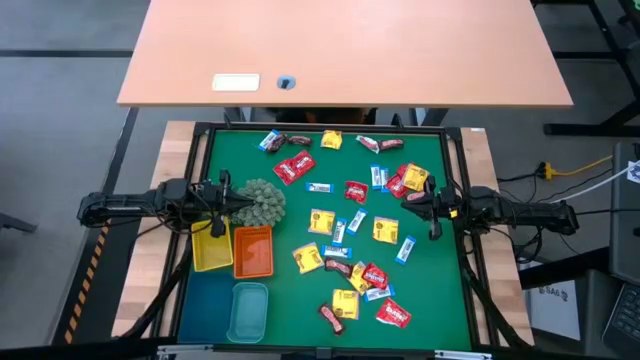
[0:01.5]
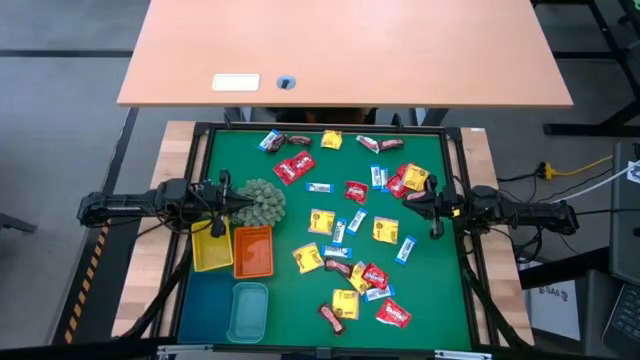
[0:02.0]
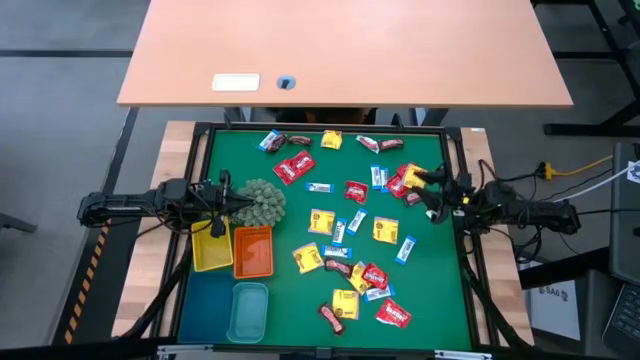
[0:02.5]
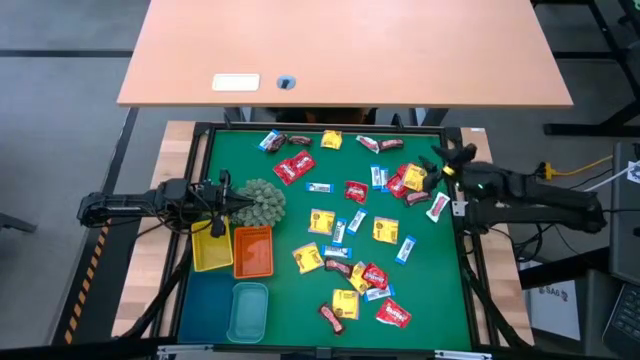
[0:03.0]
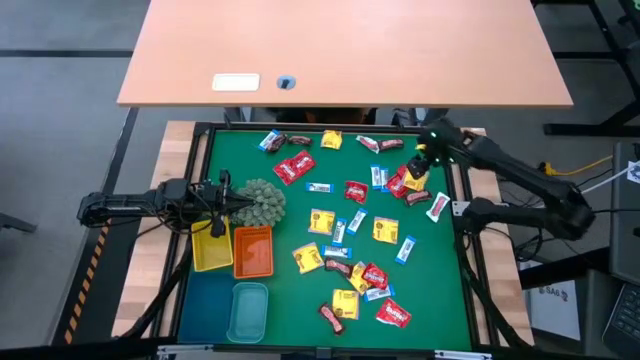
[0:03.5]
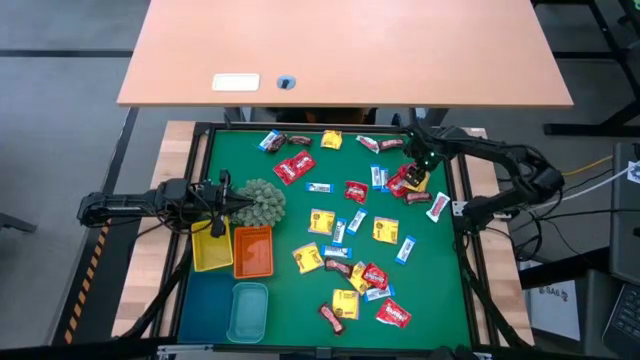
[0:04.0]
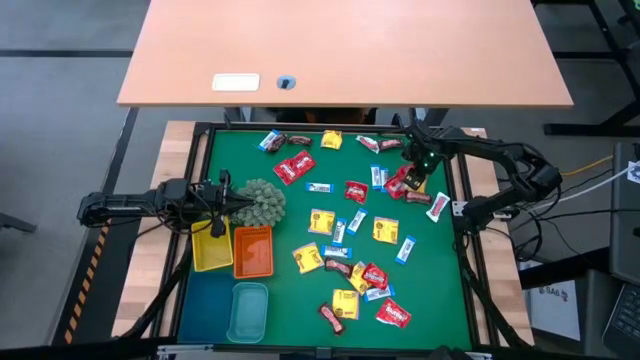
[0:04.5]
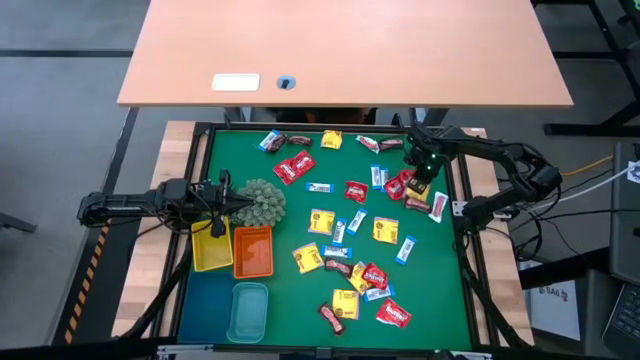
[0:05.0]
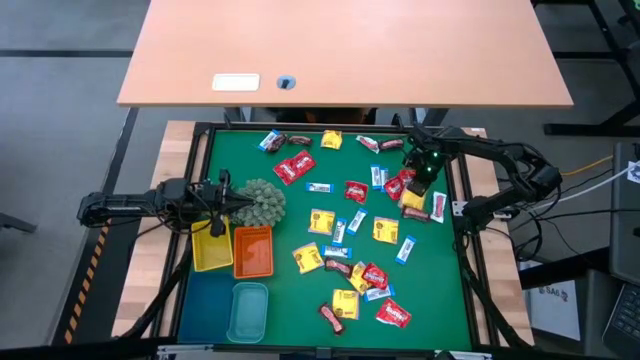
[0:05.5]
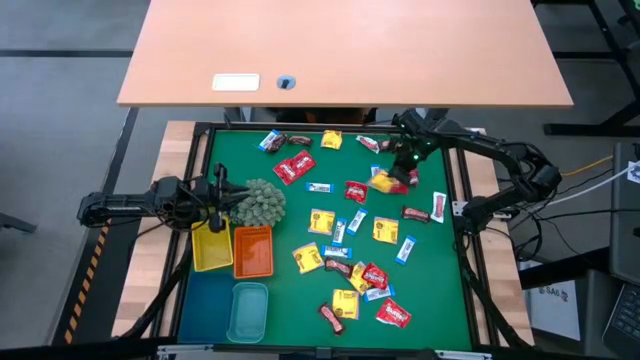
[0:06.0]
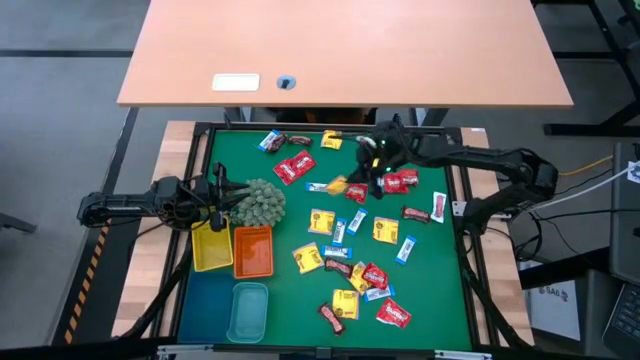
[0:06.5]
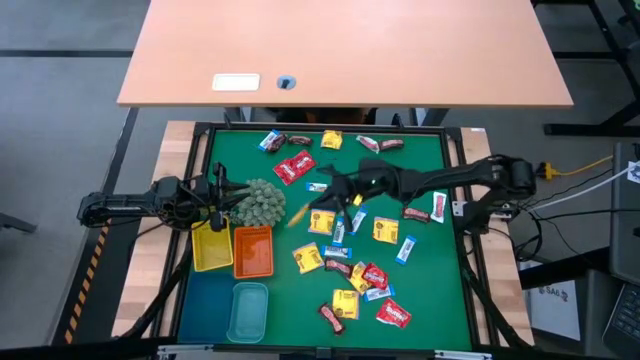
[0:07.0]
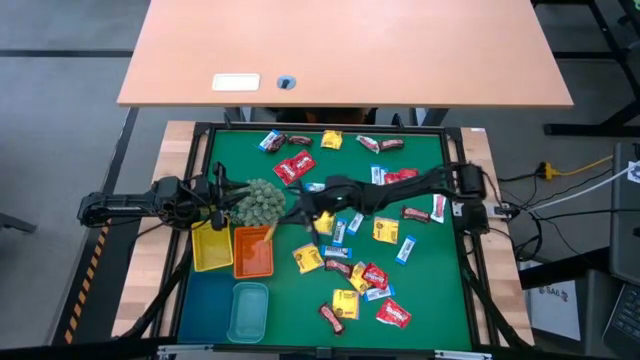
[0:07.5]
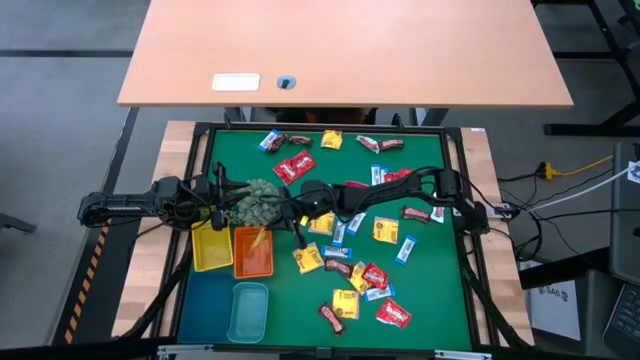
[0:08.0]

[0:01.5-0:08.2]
Task: Sort candy
Put the yellow candy into the orange basket

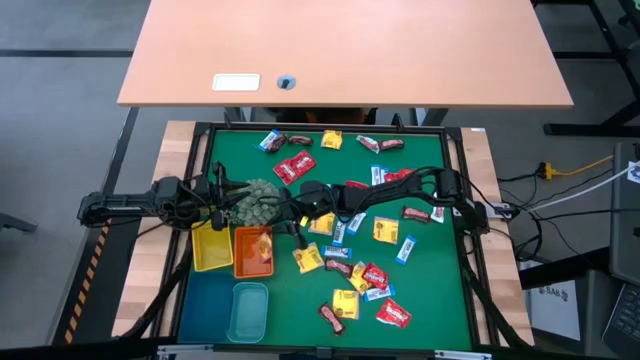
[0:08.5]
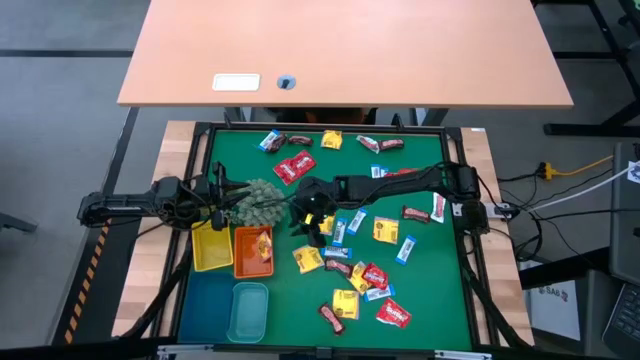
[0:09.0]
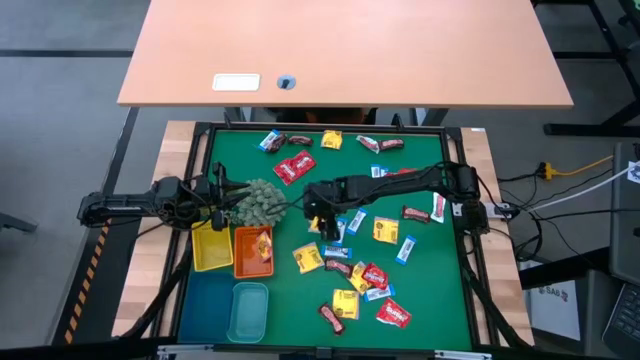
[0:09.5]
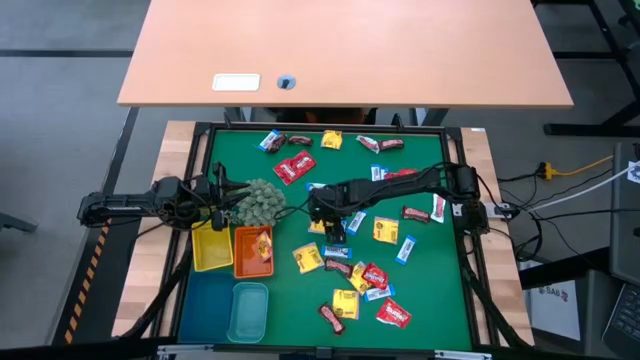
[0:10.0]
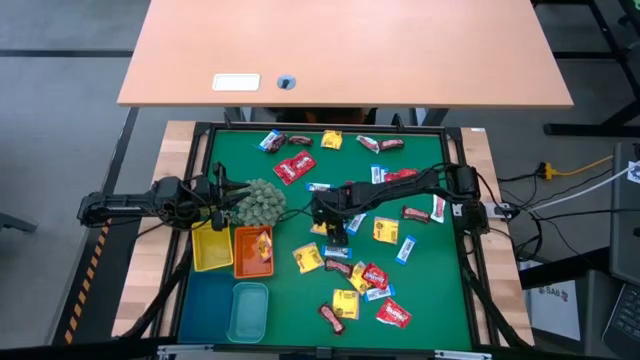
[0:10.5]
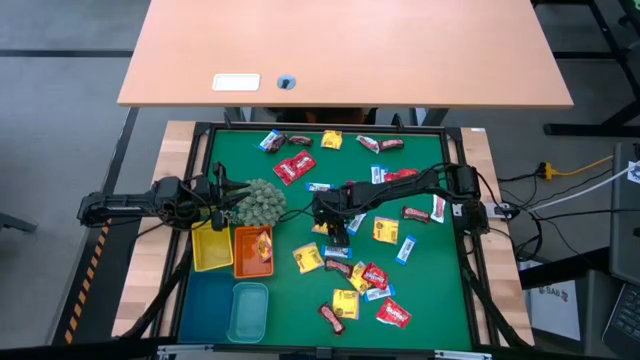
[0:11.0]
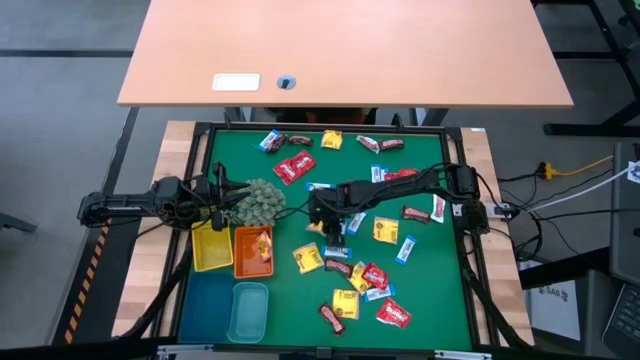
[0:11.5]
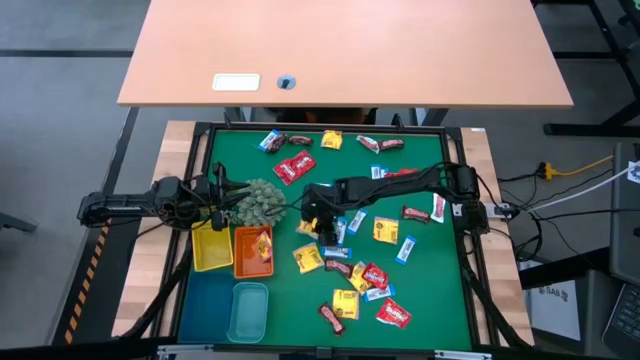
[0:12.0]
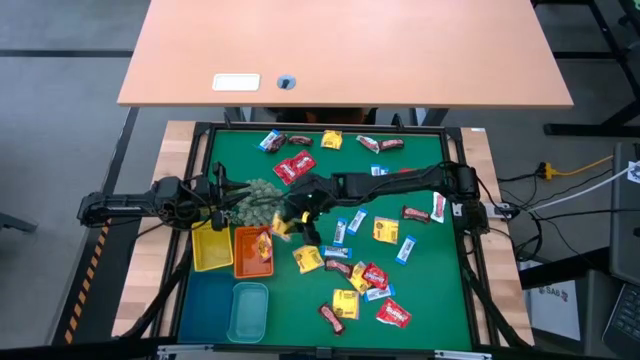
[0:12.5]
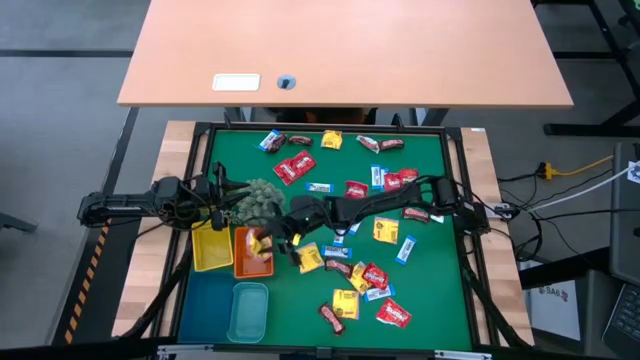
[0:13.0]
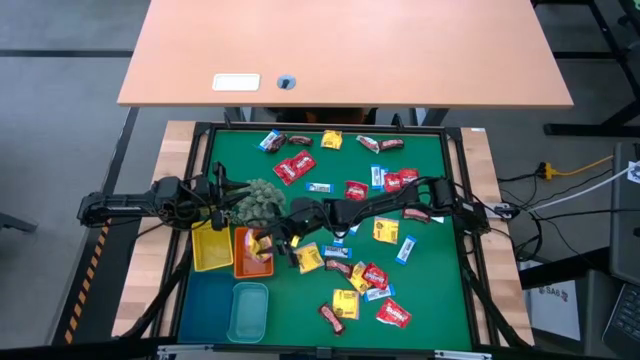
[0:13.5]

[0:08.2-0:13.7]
Put the yellow wrap candy into the orange basket

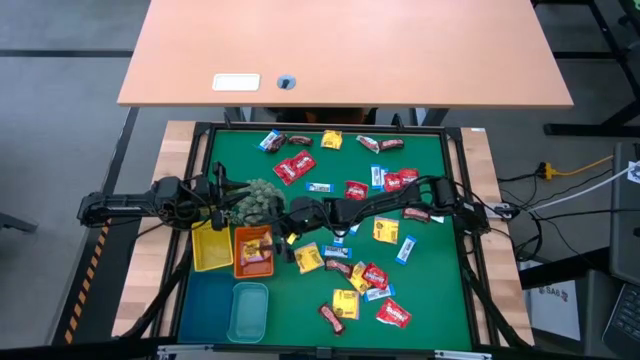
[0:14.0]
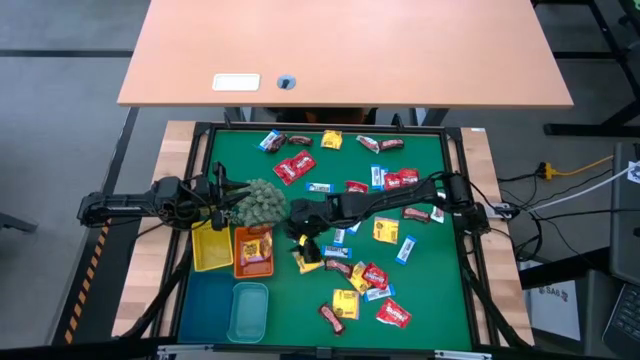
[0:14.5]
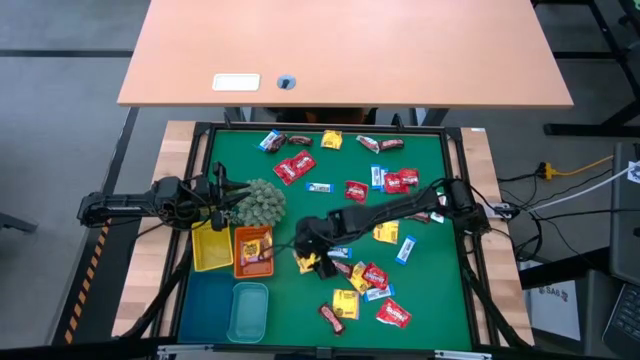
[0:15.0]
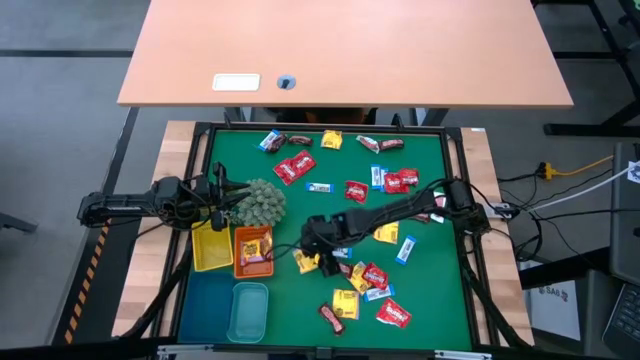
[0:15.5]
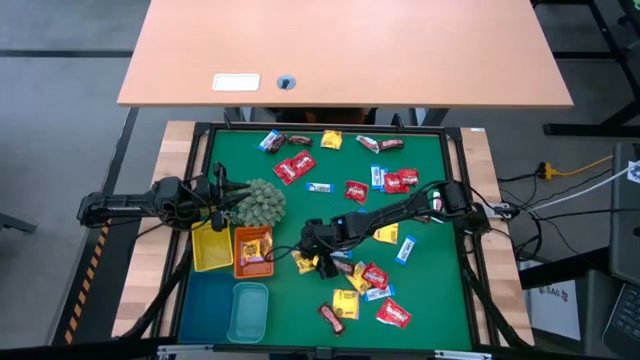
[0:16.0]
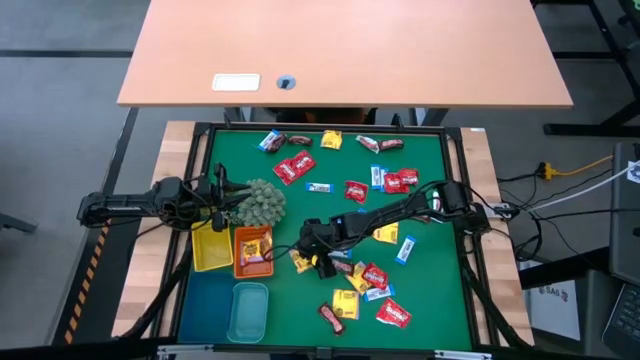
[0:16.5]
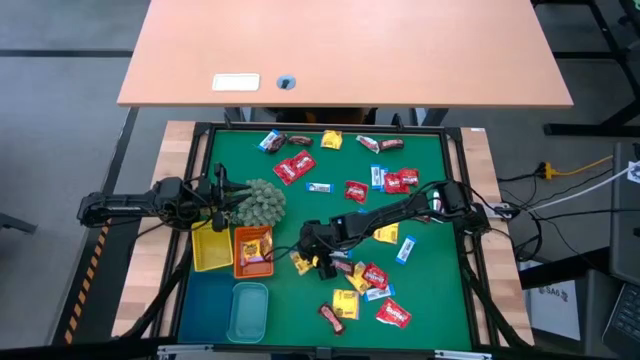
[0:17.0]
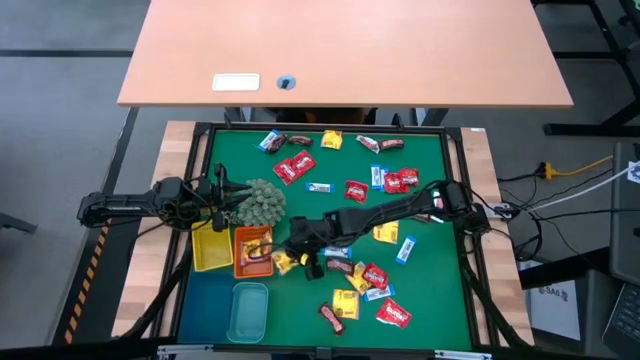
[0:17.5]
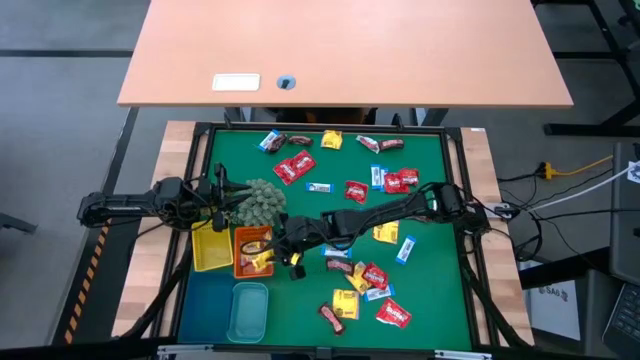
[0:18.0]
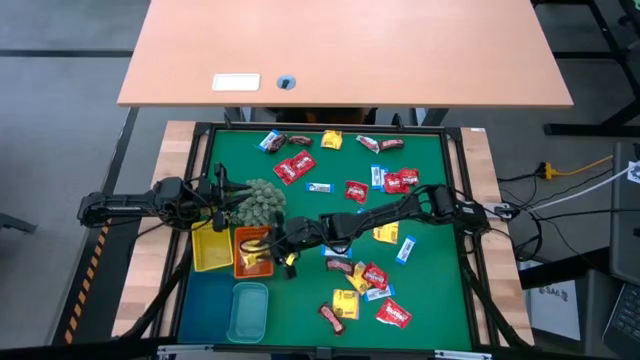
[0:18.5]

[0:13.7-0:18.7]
Put the yellow candy into the orange basket

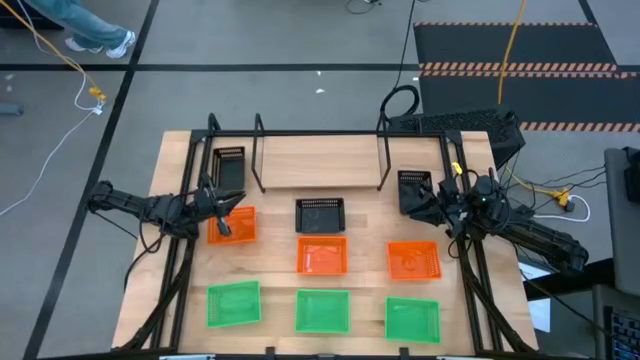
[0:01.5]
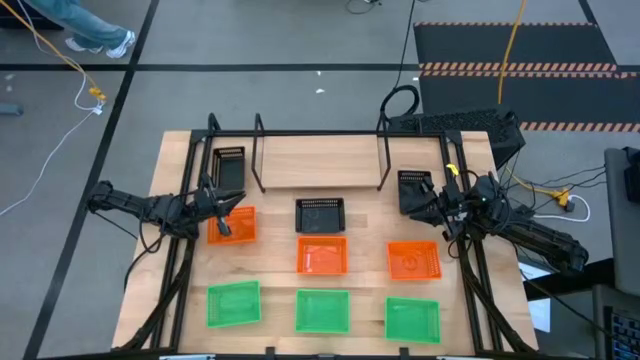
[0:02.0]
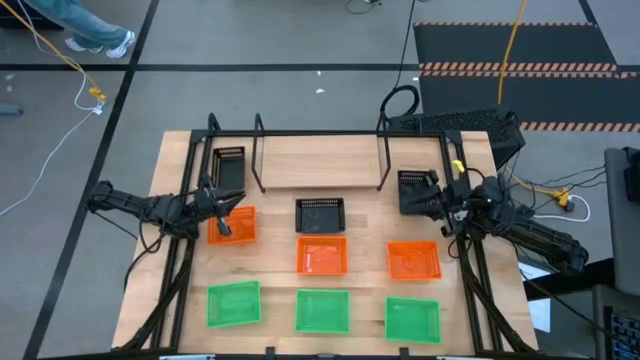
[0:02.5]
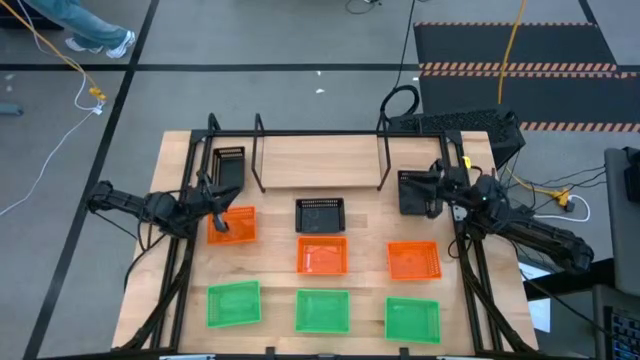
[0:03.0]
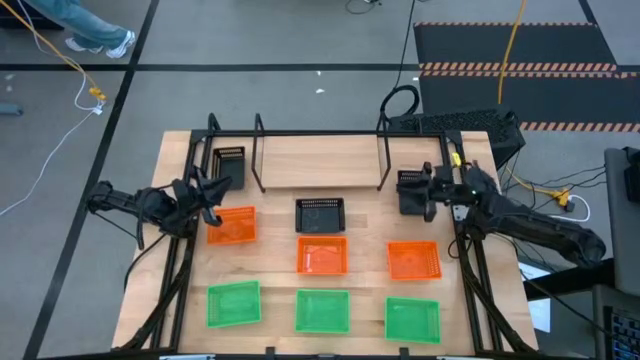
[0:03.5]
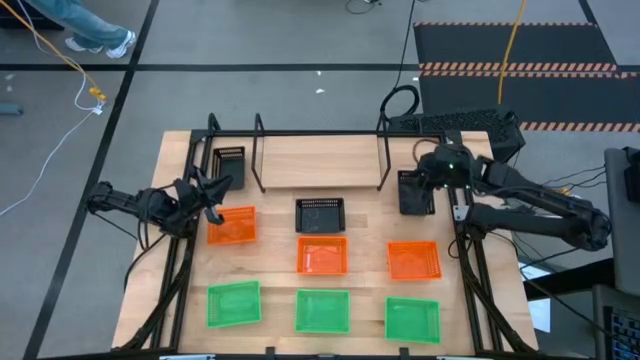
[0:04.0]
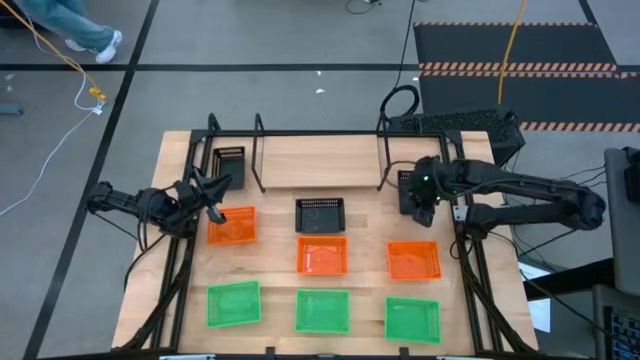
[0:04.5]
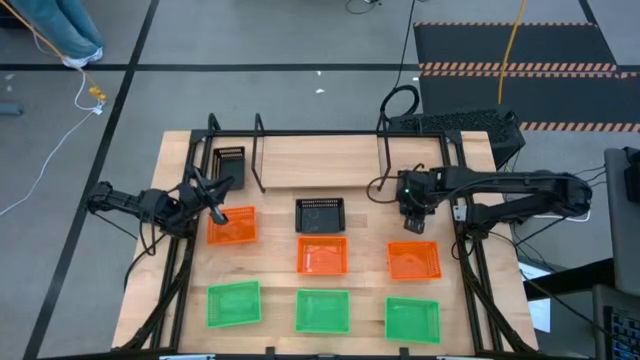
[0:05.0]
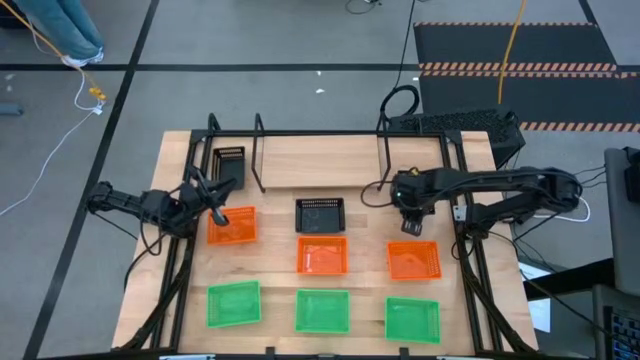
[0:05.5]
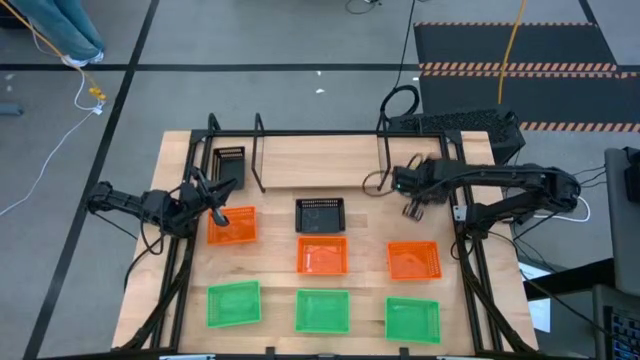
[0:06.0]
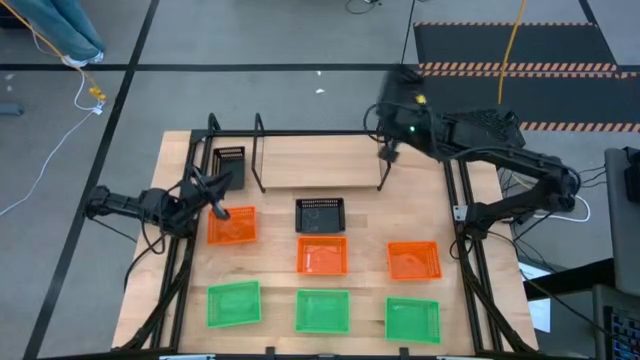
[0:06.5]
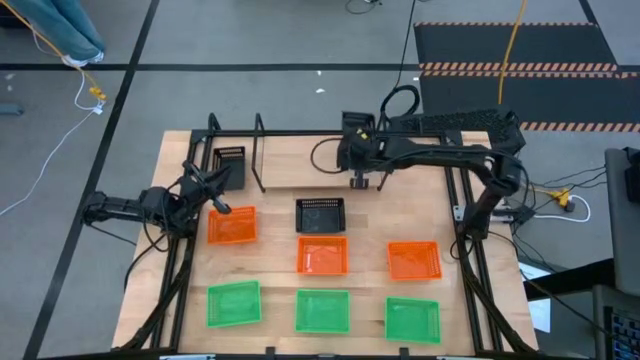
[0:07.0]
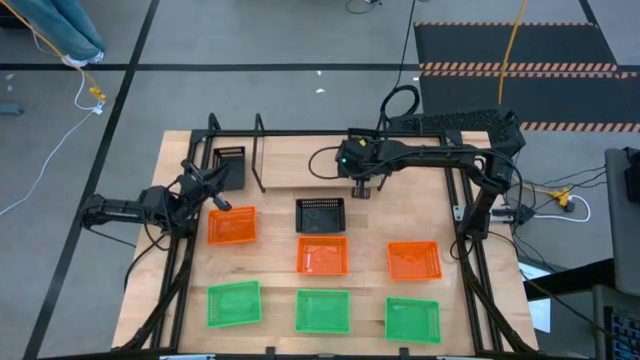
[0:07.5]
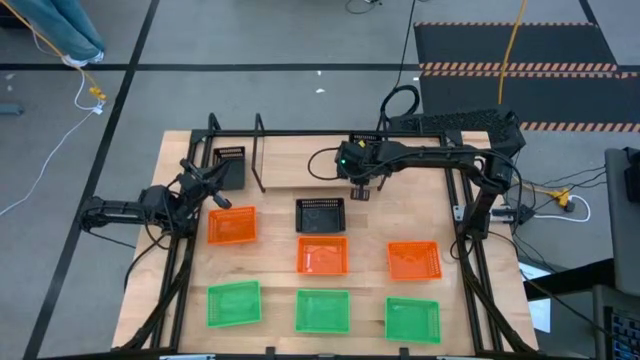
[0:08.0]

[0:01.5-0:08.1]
Task: Stack baskets on shelf by color
Put the top right black bin on the shelf
